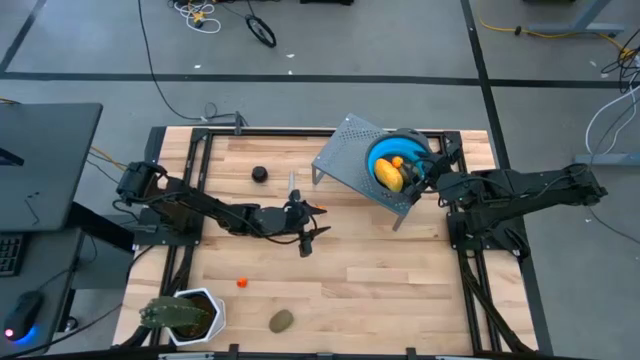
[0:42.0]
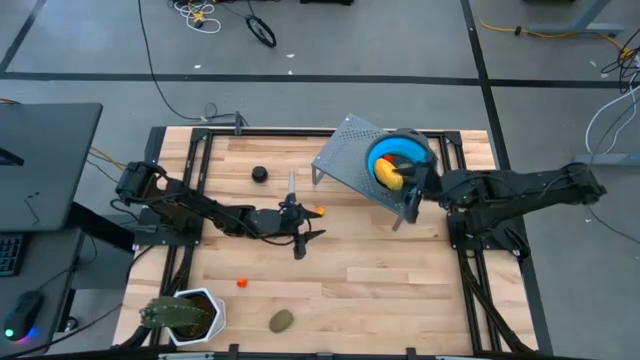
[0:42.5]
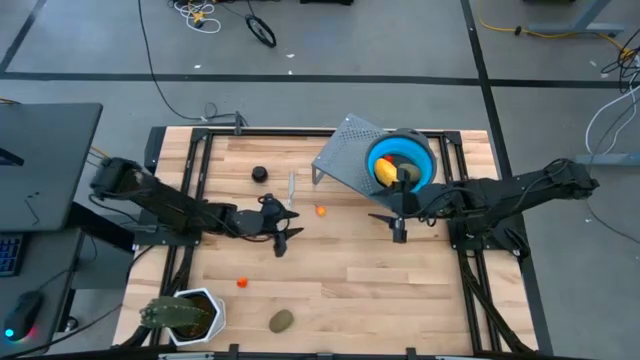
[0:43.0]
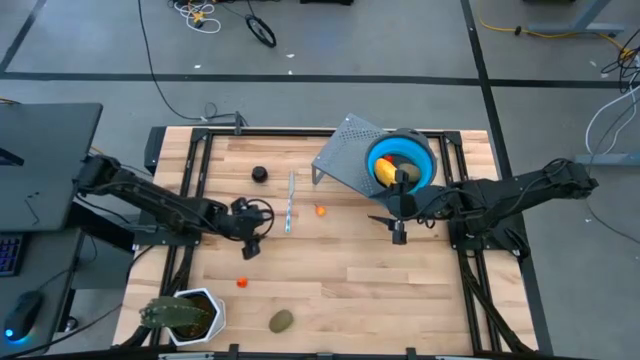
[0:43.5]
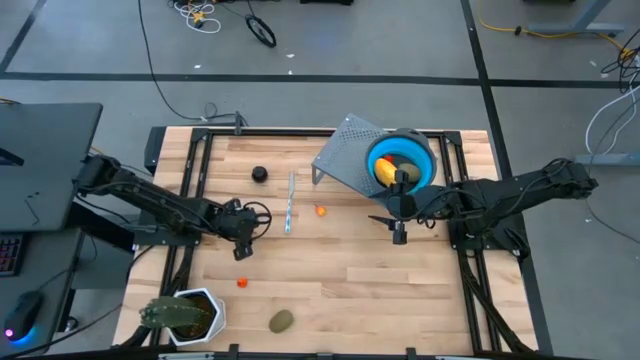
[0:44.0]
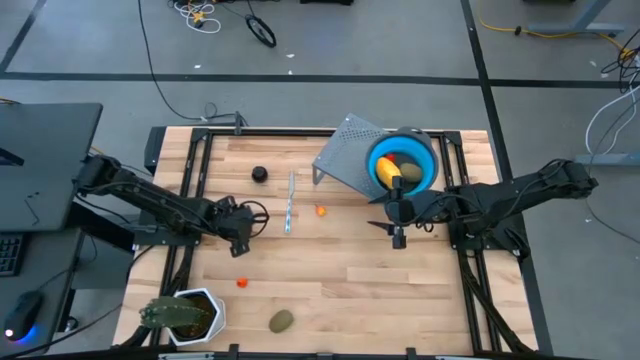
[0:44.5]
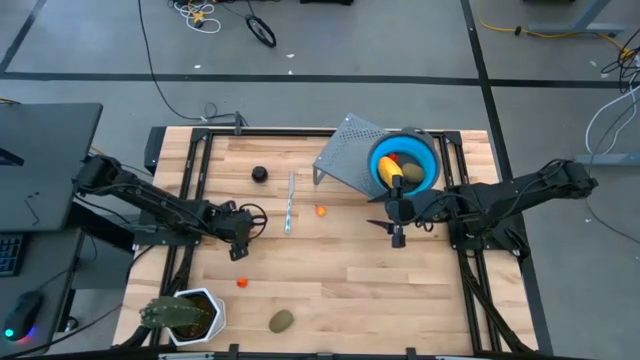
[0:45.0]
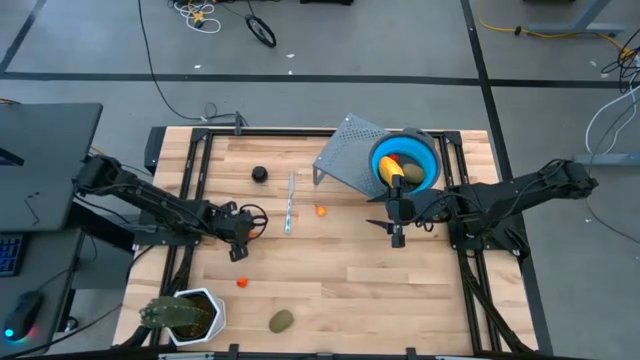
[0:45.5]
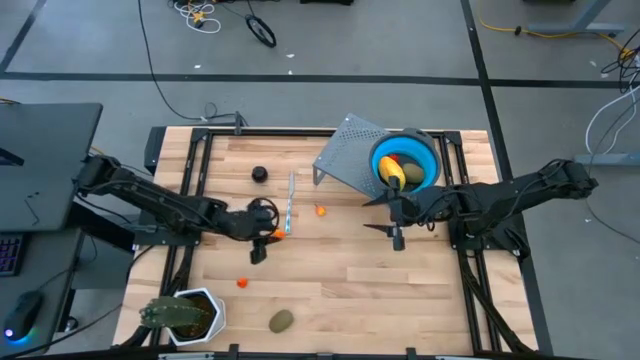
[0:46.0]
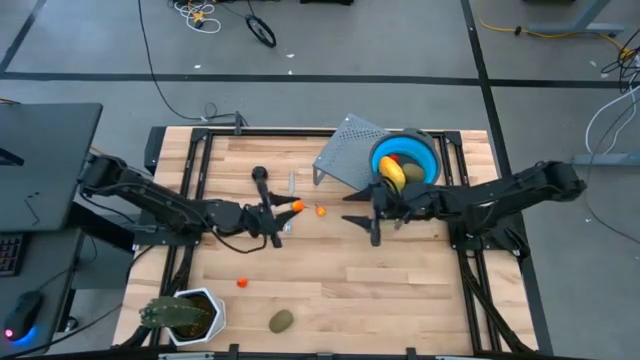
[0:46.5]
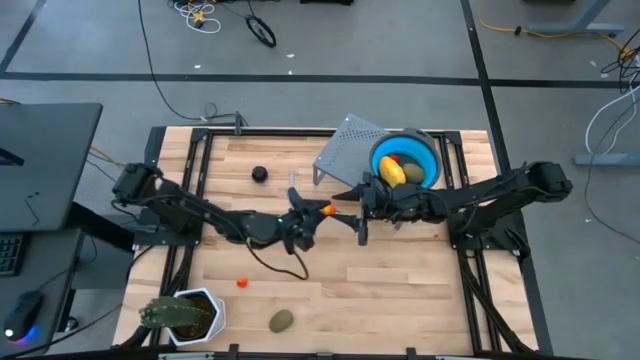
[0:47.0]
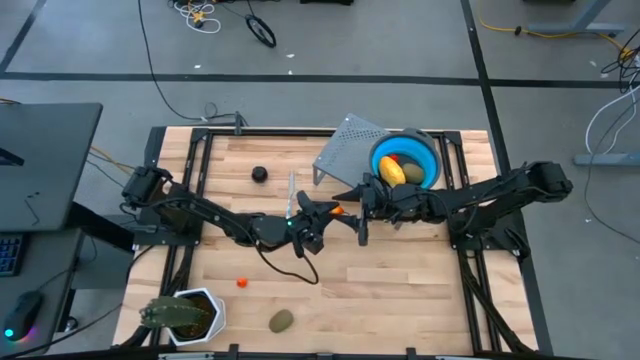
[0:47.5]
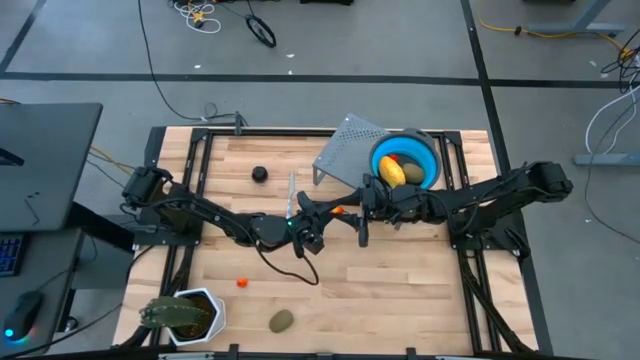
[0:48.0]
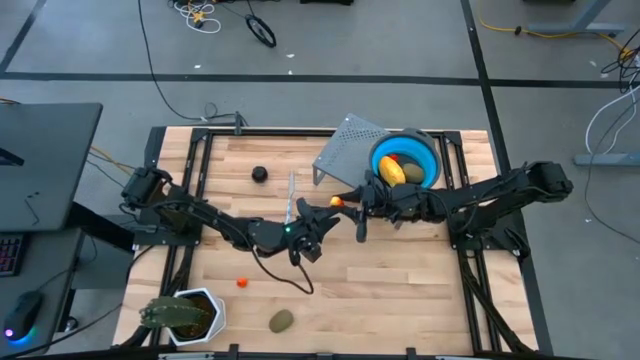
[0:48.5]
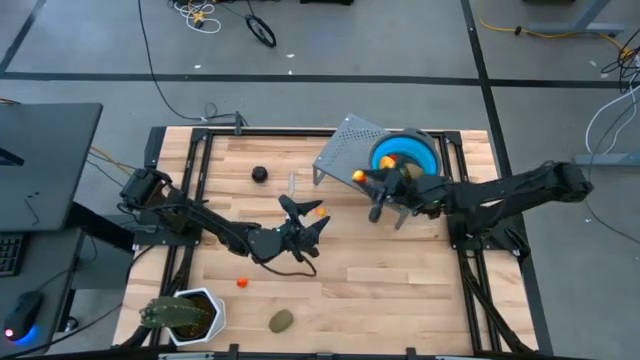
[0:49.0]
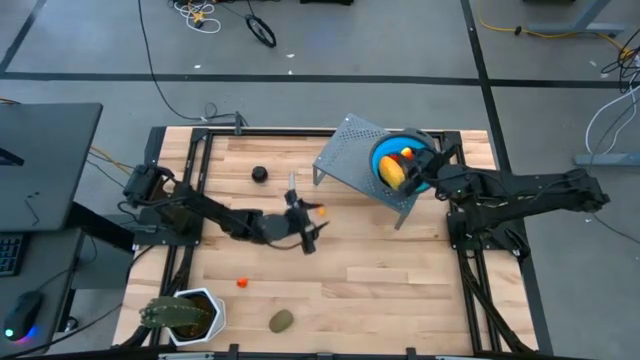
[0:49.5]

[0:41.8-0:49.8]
Task: Pick & Place Fruit
Put the yellow peach in the blue strainer bowl on the shelf

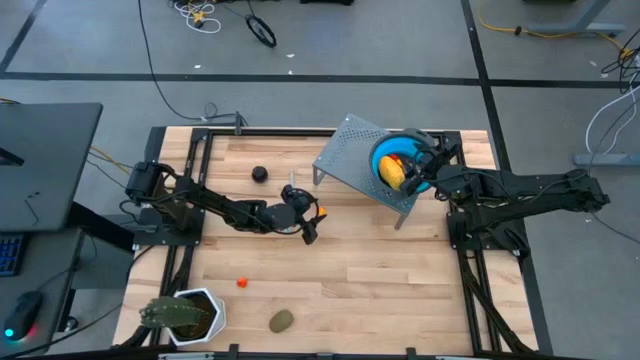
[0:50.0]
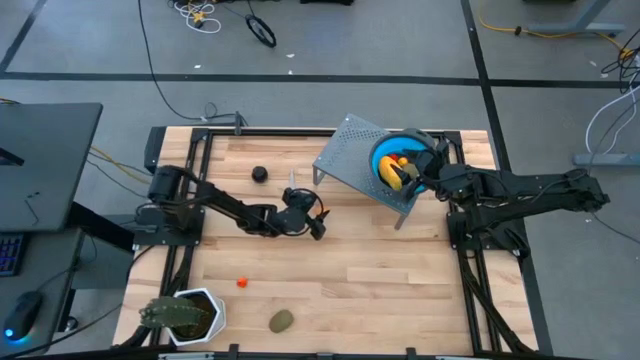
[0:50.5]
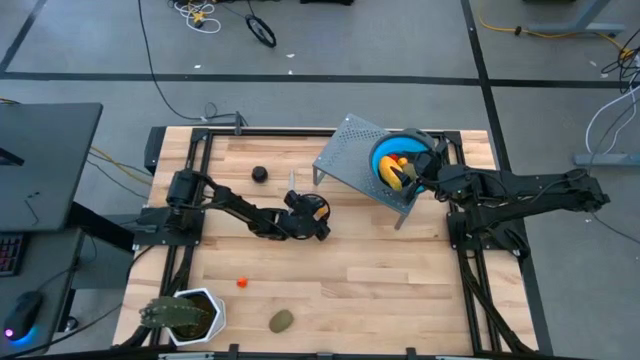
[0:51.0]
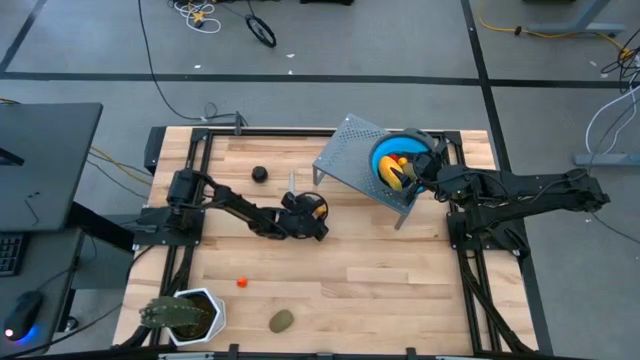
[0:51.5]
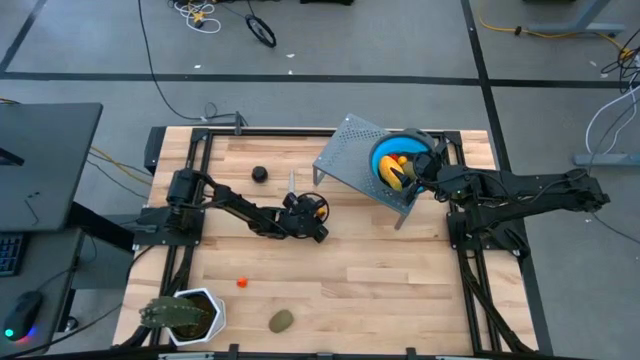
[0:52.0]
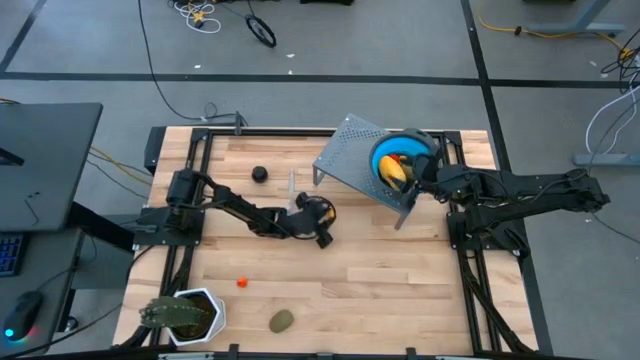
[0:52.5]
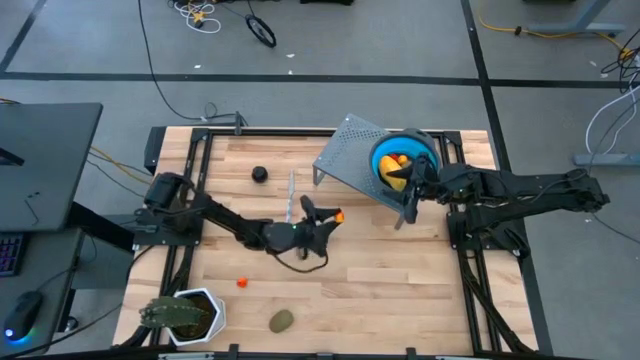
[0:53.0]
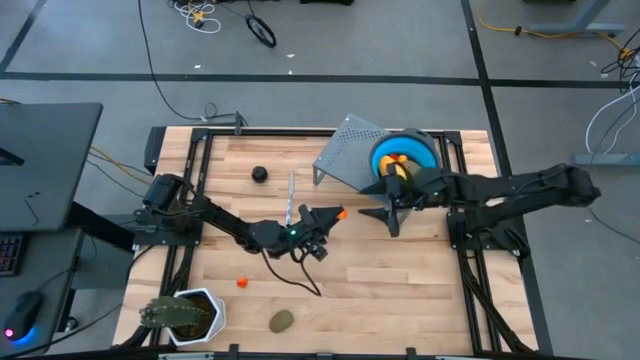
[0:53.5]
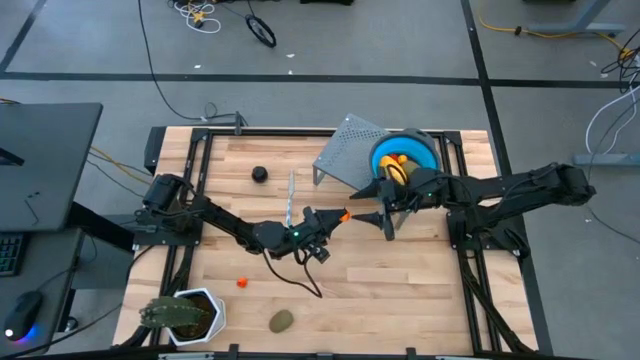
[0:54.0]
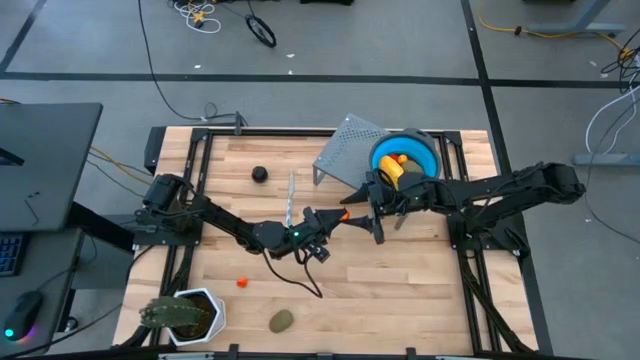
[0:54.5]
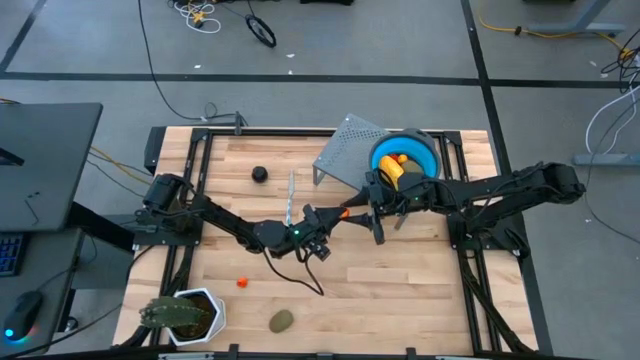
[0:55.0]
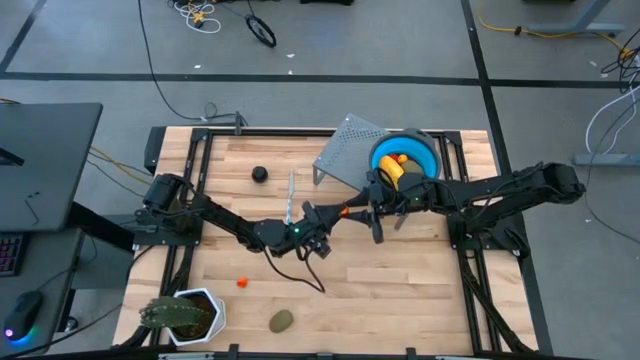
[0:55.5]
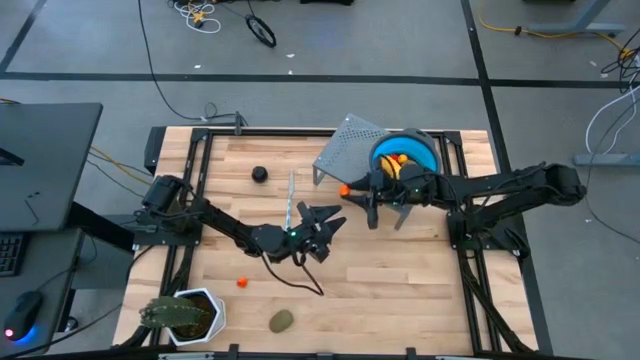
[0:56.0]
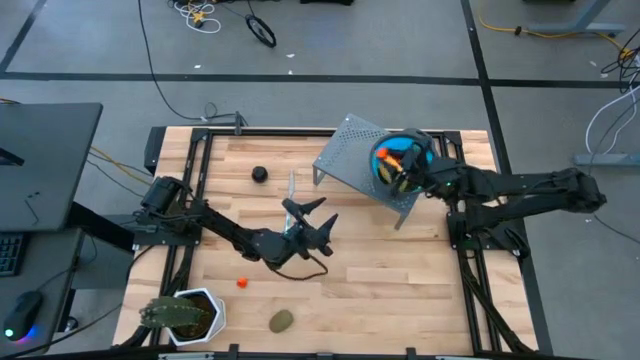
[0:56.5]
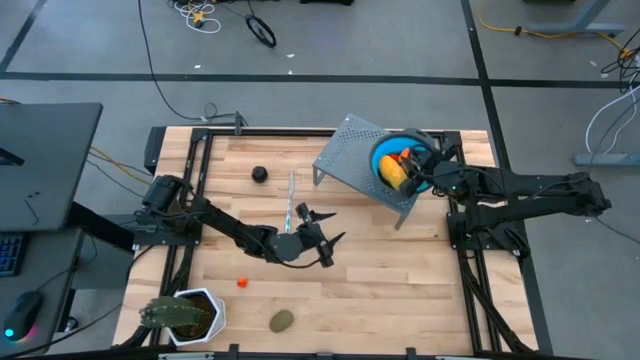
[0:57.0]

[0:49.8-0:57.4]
Put the yellow peach in the blue strainer bowl on the shelf

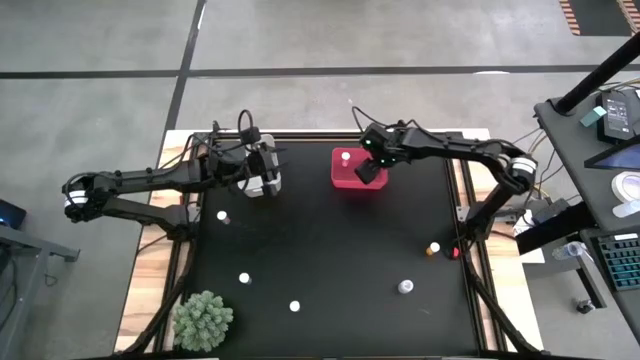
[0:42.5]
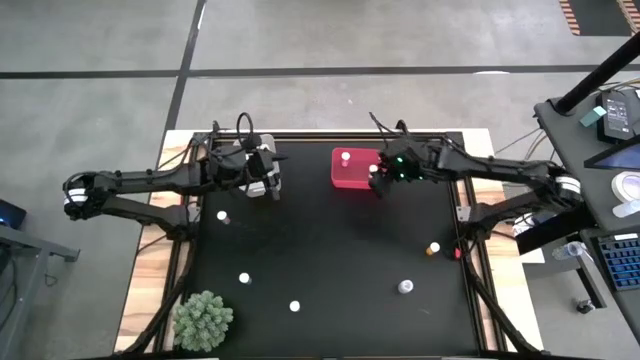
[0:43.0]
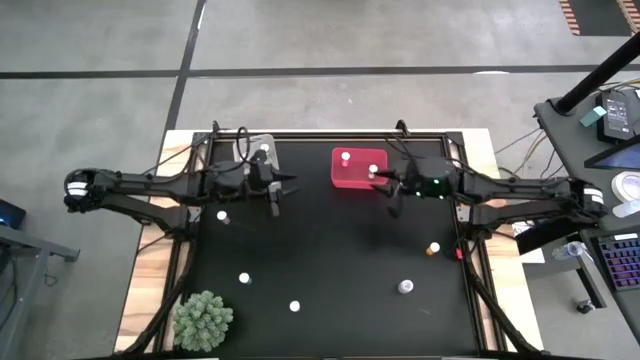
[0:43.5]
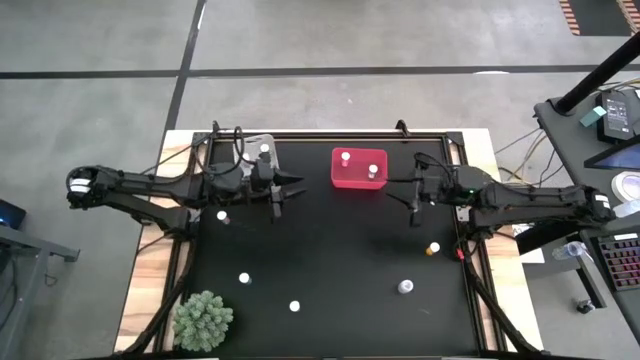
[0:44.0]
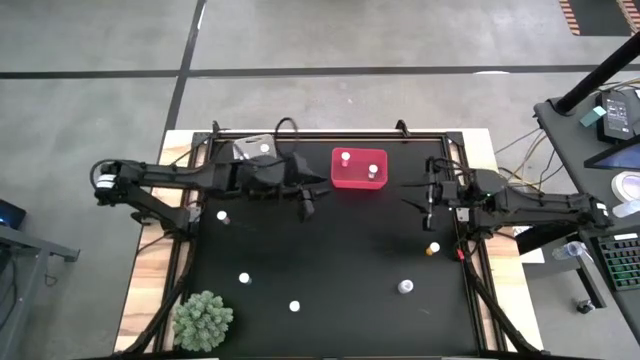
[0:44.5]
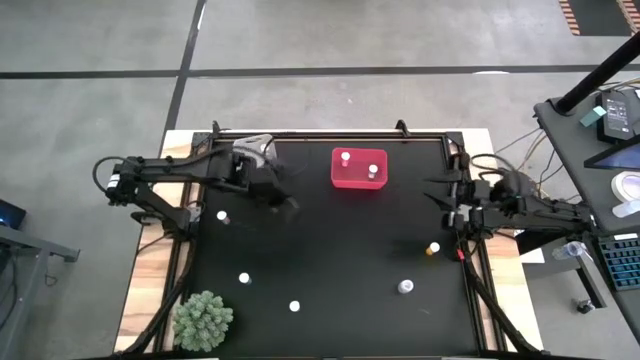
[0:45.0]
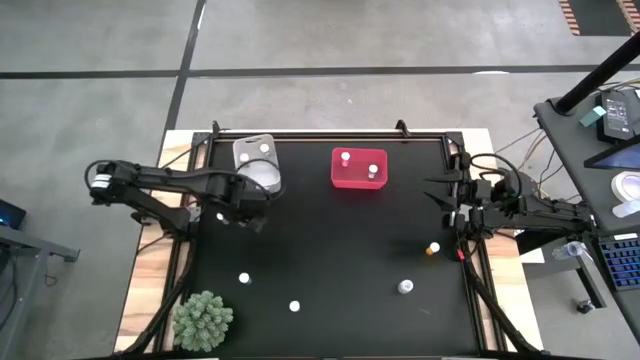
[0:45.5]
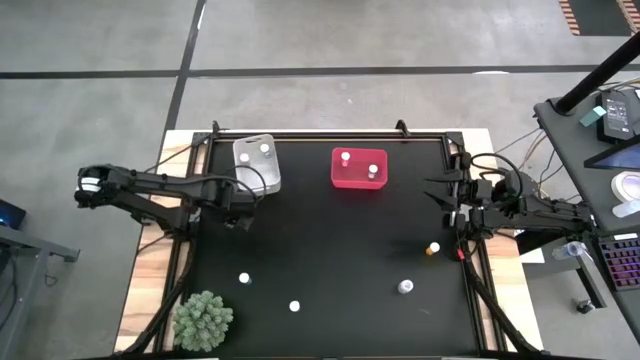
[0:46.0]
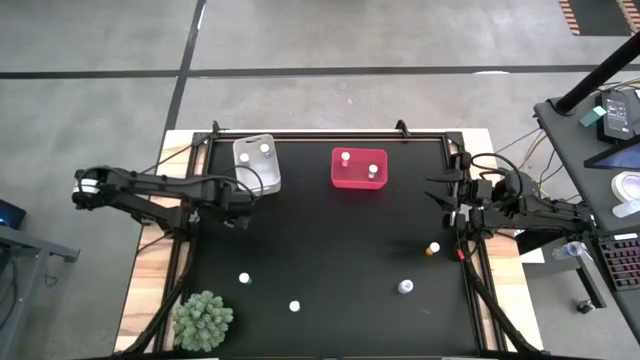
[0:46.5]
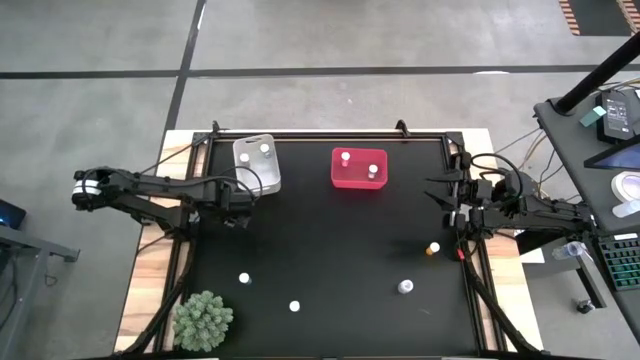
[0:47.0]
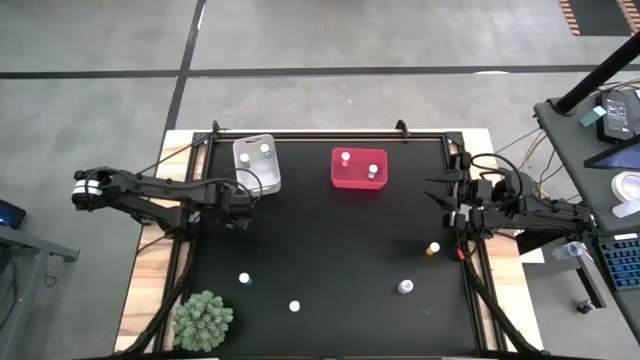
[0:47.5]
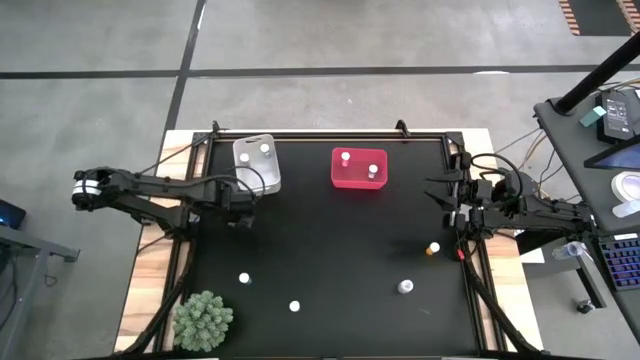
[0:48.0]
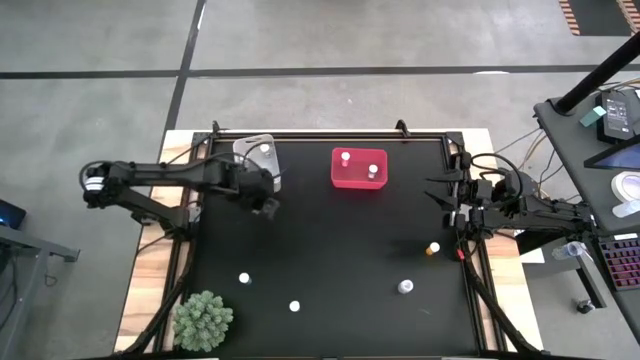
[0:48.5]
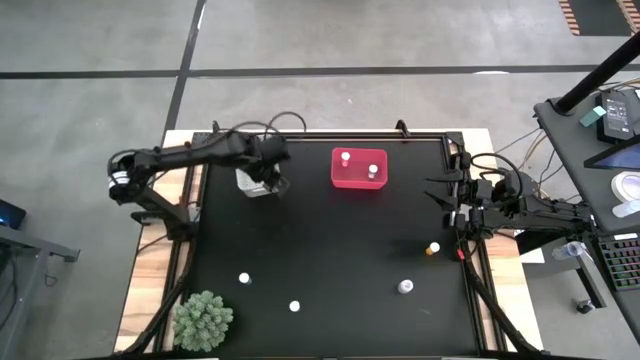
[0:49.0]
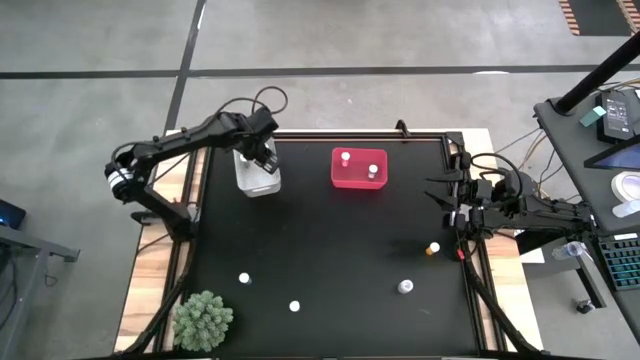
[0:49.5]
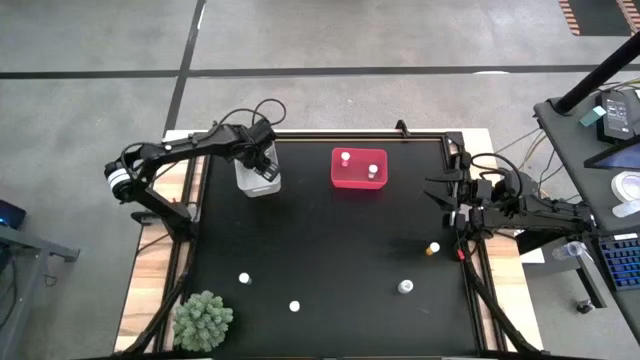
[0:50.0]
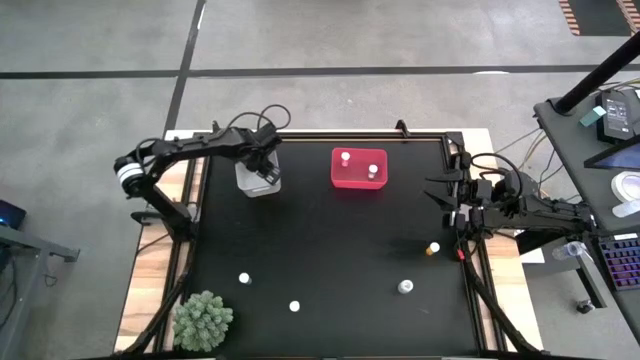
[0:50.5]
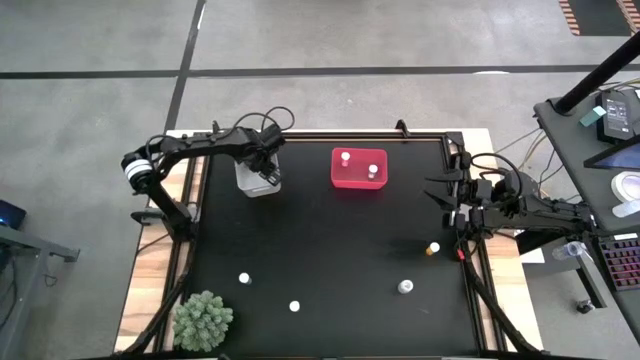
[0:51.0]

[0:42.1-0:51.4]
Task: Pick and place medicine bottles into bin by pill shape (circle, oval)
Put the blue capsule bottle into the gray bin
